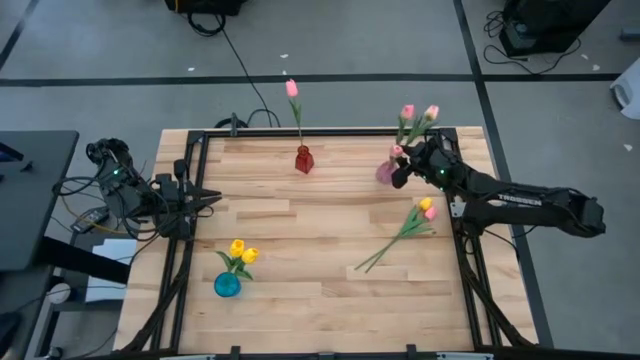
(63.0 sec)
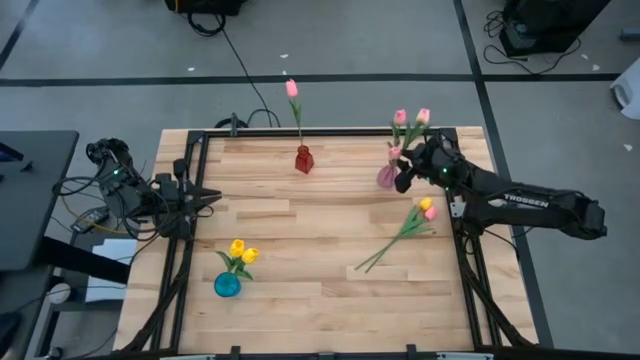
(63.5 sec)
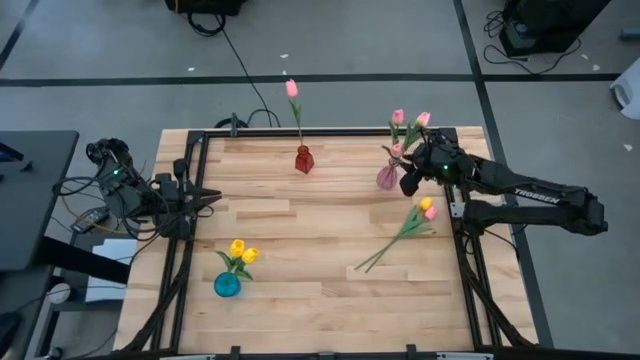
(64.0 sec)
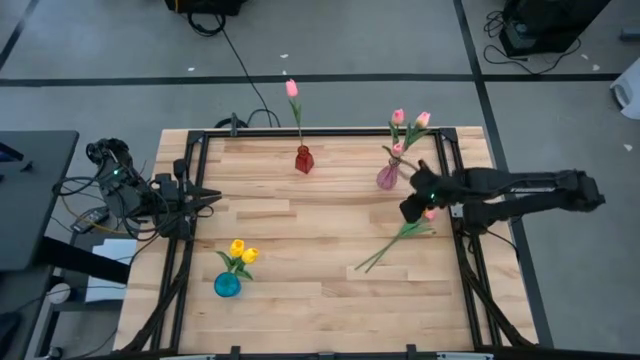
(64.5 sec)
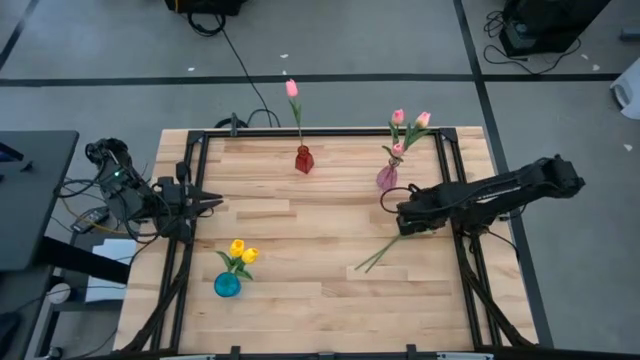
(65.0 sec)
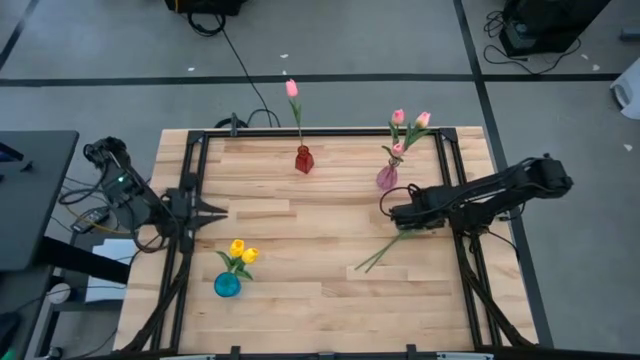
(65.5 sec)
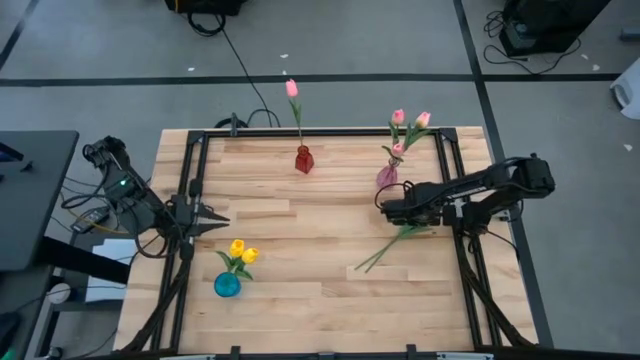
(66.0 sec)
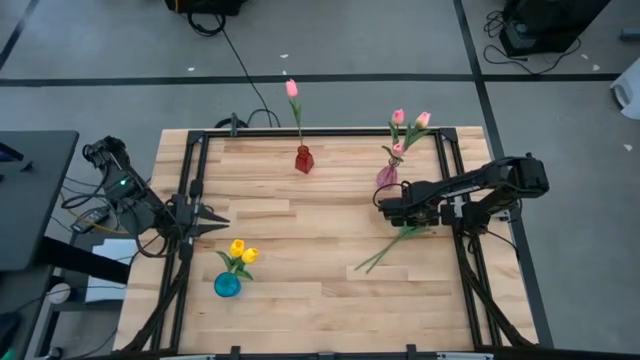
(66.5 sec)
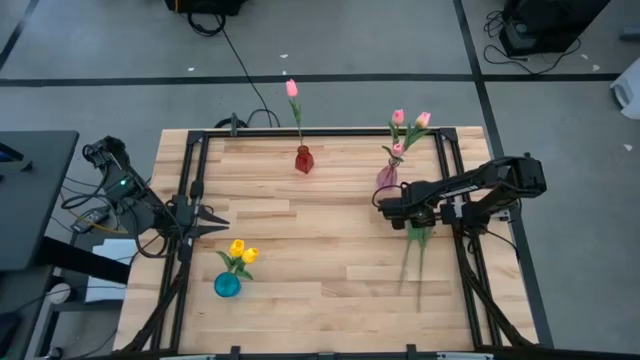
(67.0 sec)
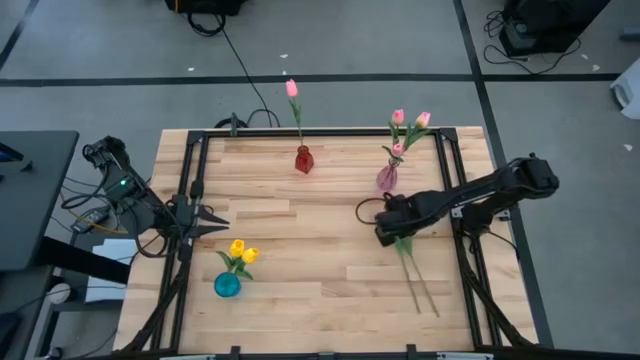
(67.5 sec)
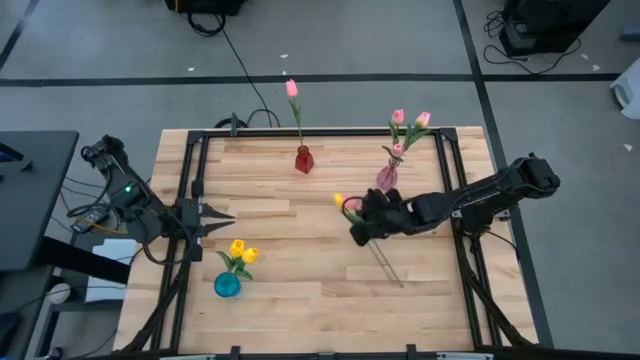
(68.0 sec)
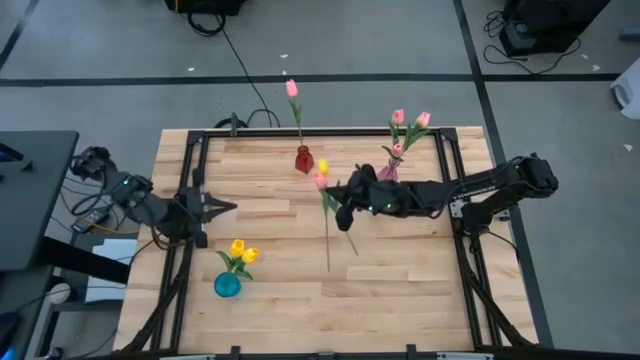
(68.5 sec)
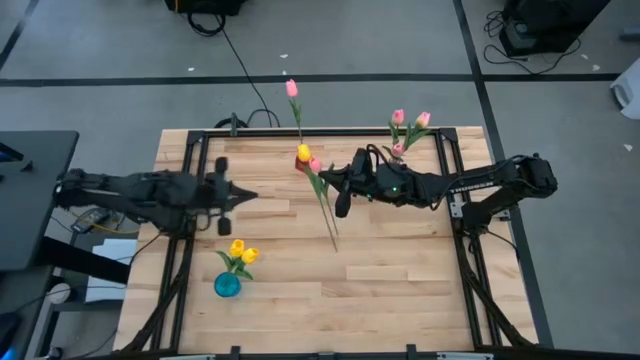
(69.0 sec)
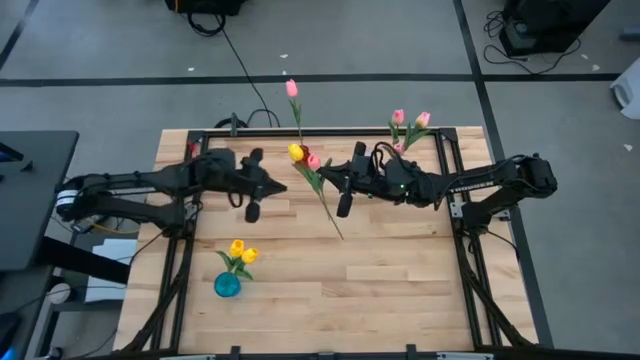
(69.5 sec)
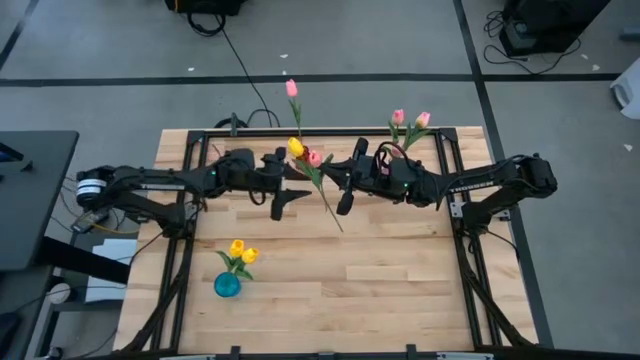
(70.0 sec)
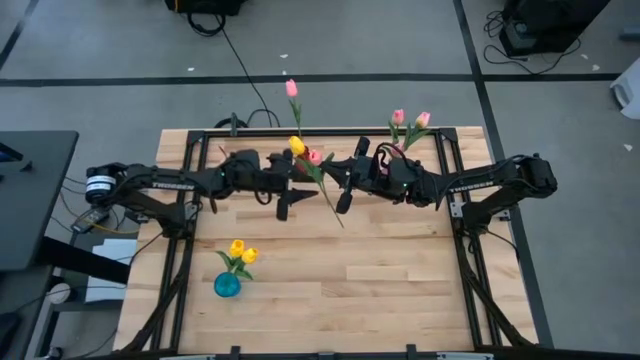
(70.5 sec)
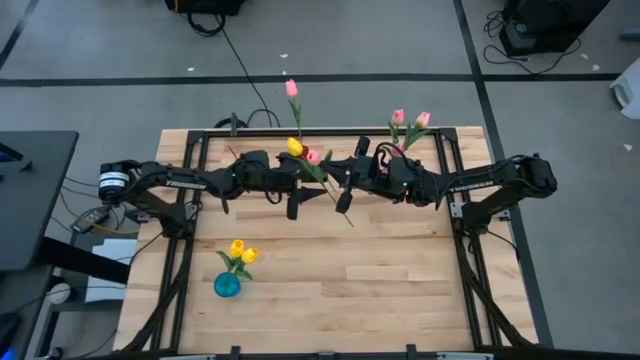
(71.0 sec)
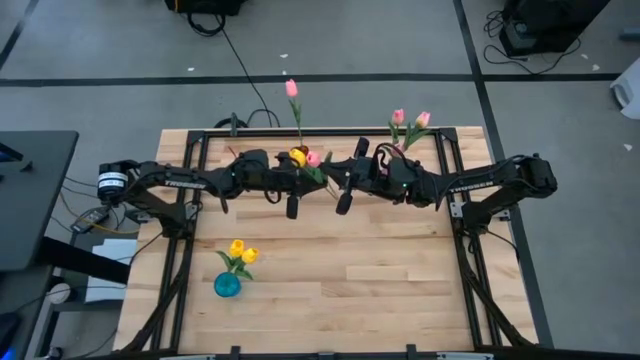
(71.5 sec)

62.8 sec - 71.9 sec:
Task: Sort flowers into vase by color
Put the yellow tulip into the blue vase

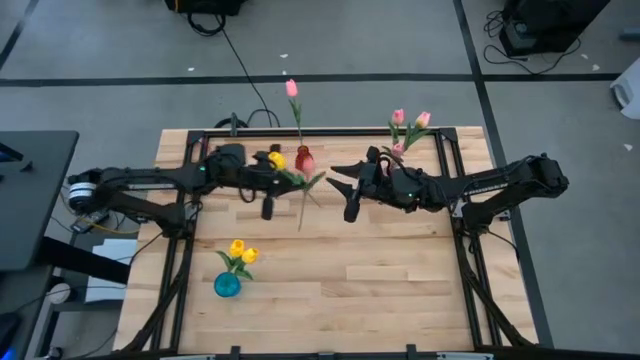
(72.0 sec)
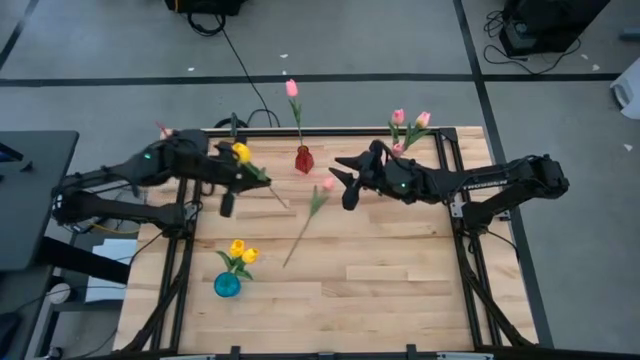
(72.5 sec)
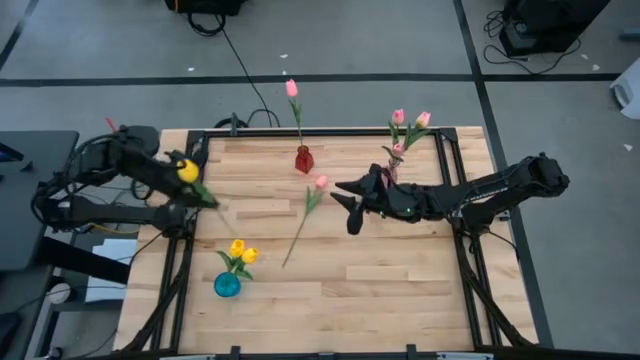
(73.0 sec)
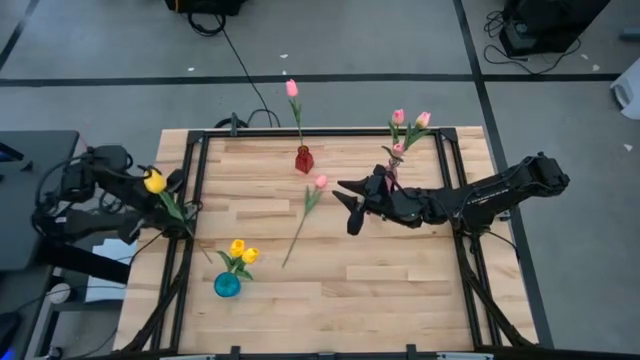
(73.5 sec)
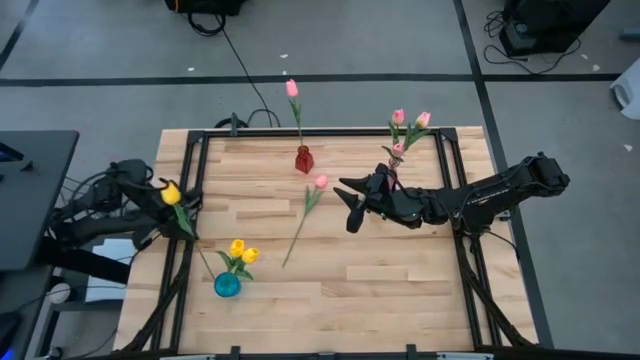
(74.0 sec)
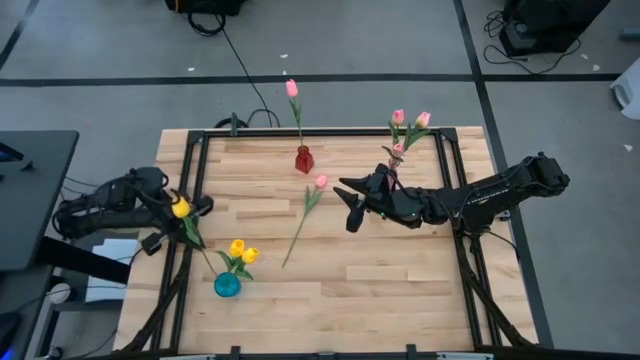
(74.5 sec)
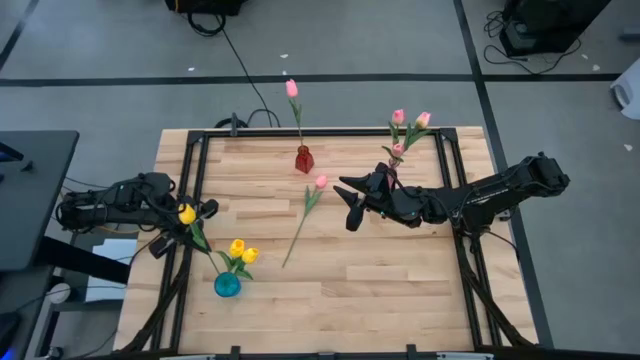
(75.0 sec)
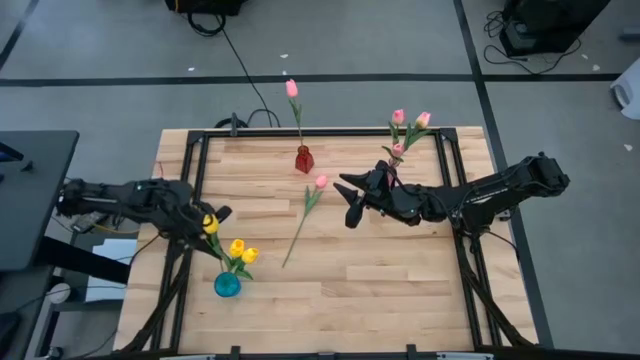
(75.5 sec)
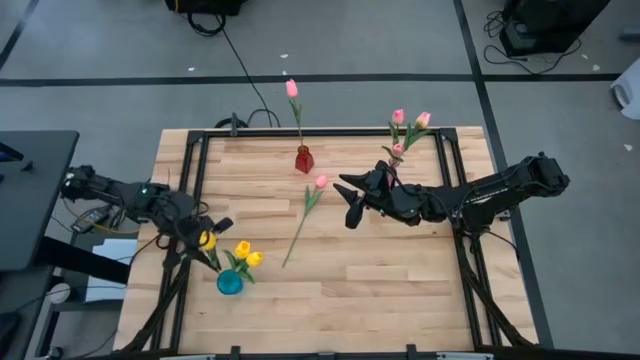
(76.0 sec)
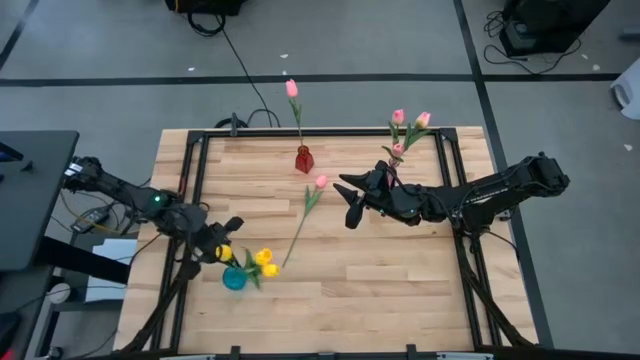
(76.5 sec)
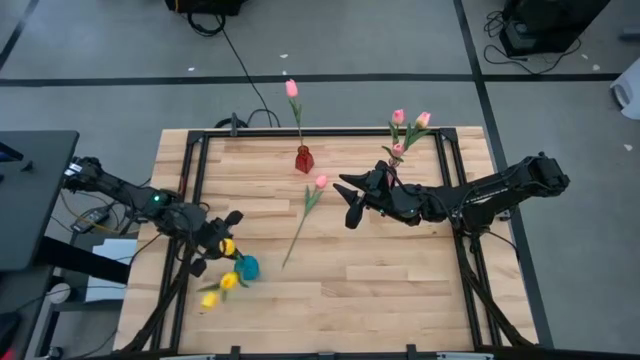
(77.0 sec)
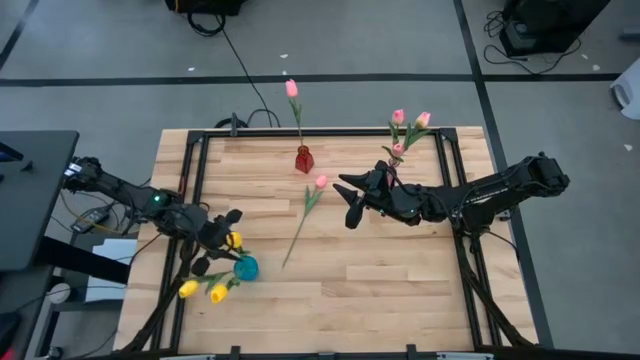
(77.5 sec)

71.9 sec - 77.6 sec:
Put the yellow tulip into the blue vase

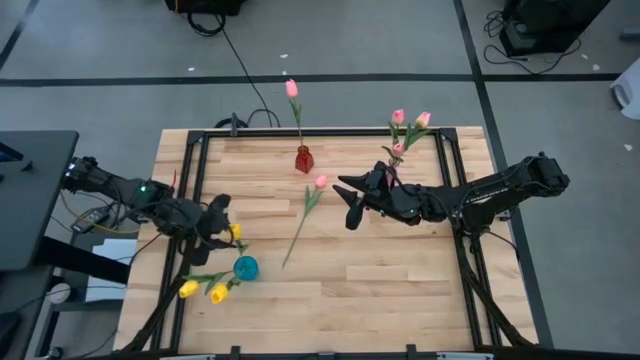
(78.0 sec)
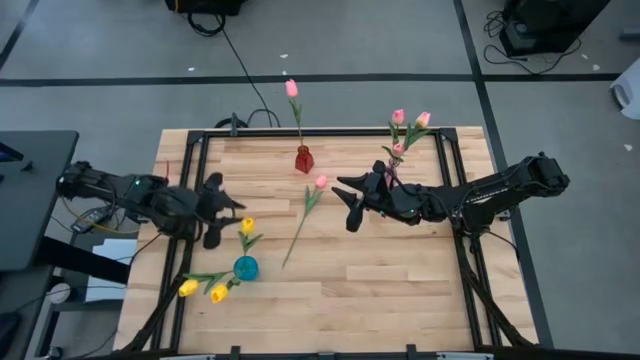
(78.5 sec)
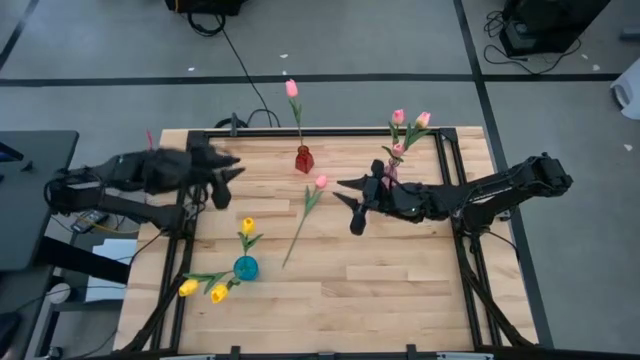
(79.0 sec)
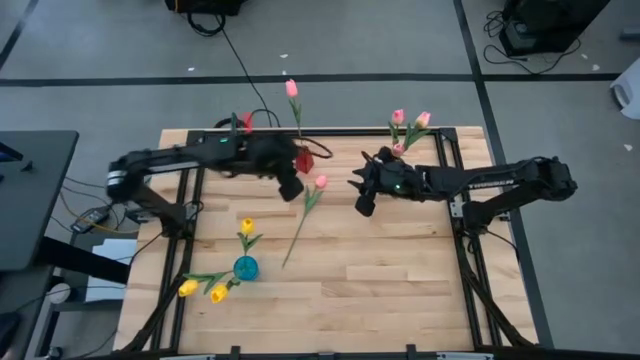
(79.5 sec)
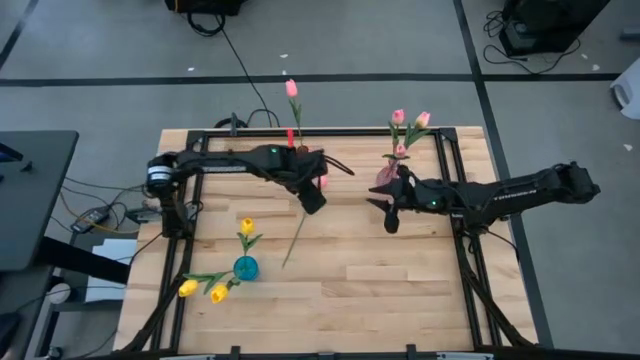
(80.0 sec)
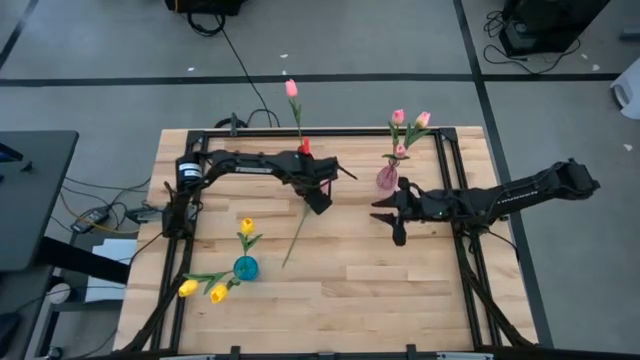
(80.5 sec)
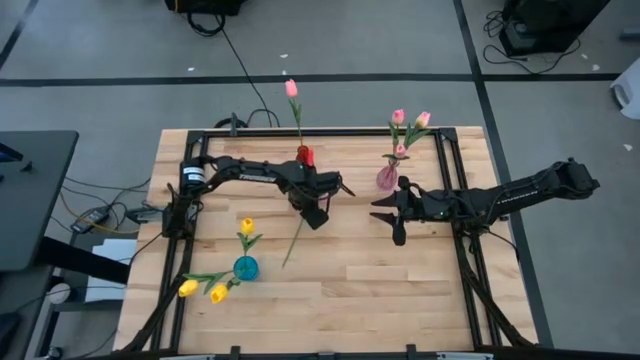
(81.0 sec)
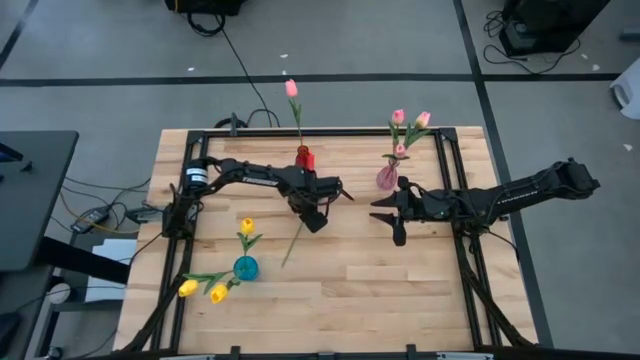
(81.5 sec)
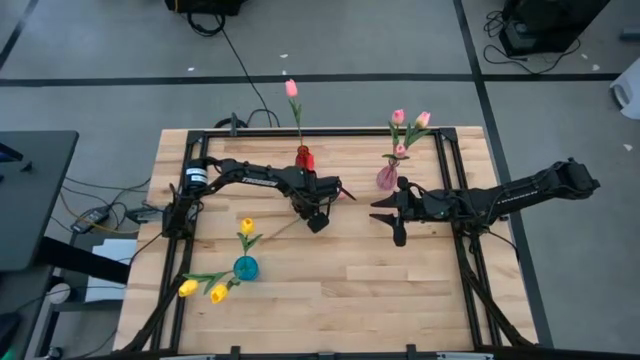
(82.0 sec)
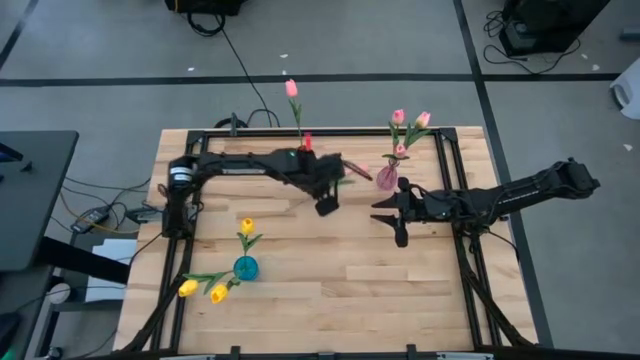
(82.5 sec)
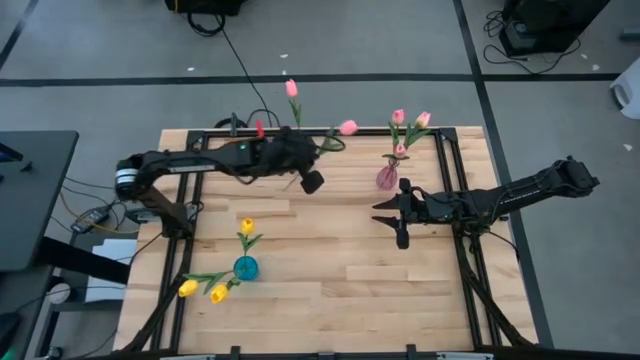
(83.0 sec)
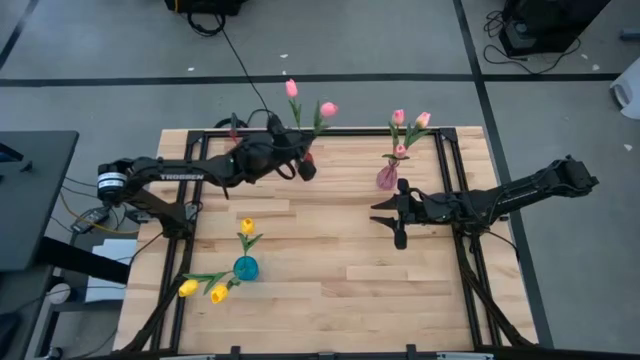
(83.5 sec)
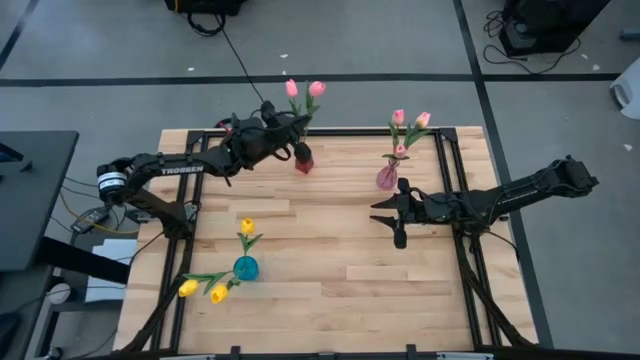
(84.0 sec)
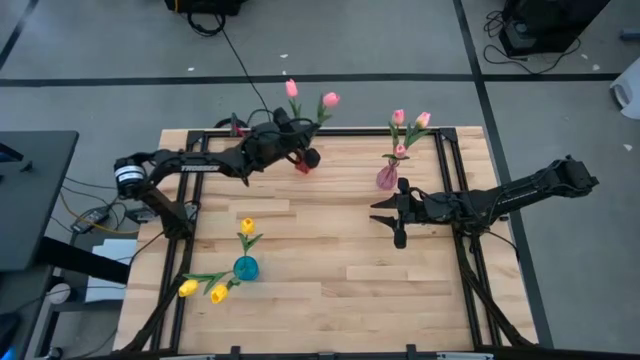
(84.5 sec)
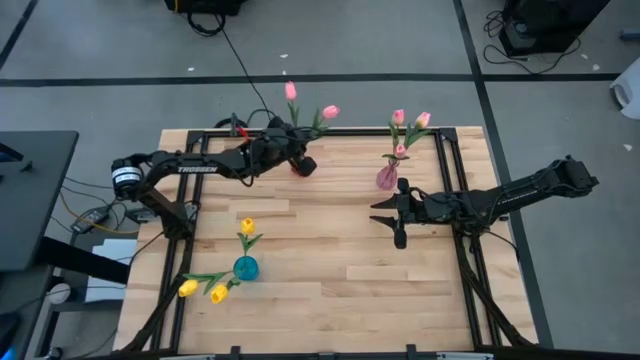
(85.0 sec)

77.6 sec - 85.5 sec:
Put the pink tulip into the red vase
